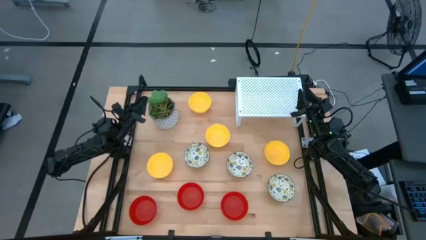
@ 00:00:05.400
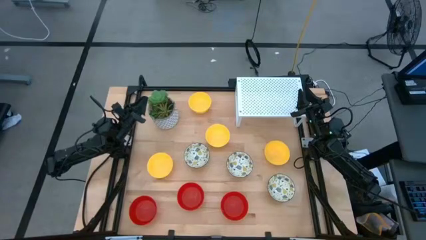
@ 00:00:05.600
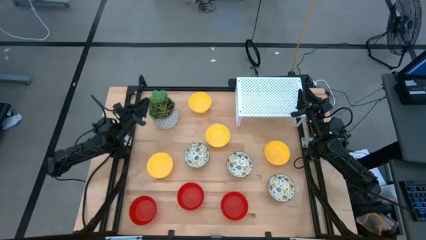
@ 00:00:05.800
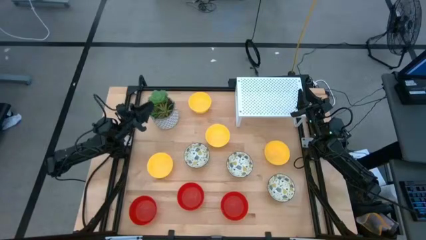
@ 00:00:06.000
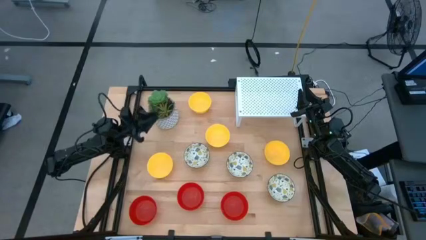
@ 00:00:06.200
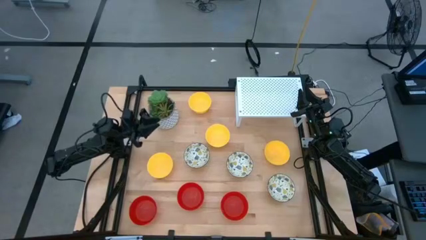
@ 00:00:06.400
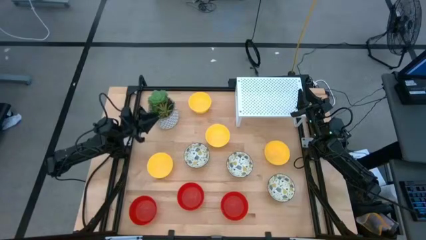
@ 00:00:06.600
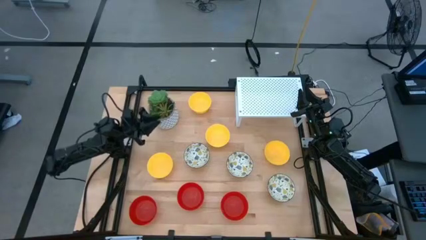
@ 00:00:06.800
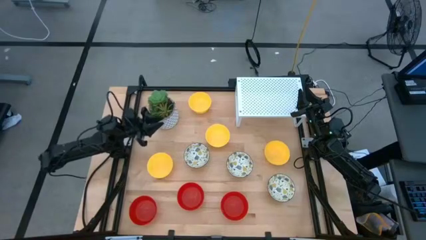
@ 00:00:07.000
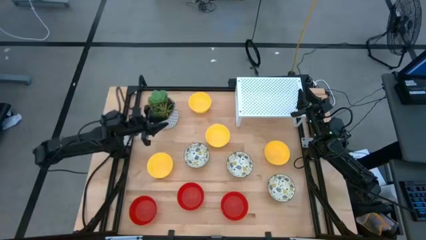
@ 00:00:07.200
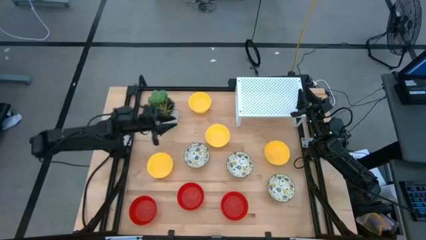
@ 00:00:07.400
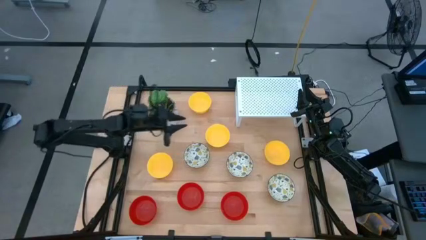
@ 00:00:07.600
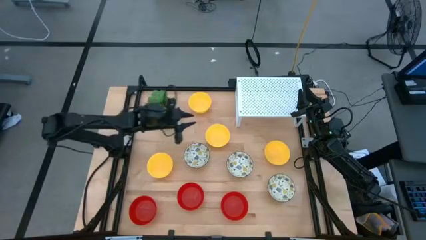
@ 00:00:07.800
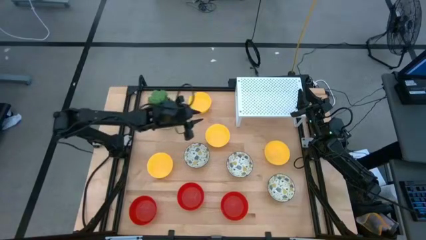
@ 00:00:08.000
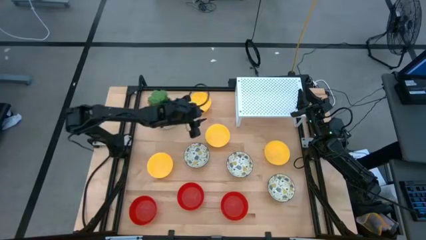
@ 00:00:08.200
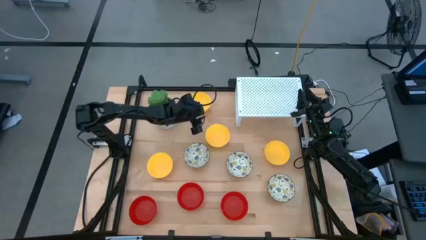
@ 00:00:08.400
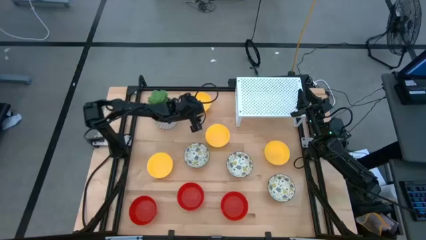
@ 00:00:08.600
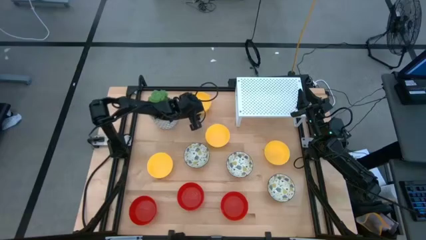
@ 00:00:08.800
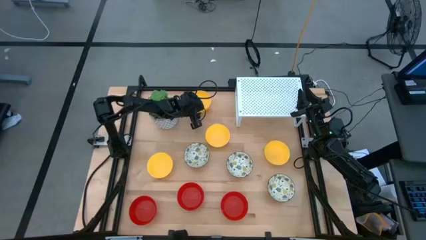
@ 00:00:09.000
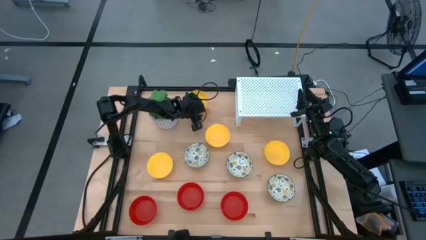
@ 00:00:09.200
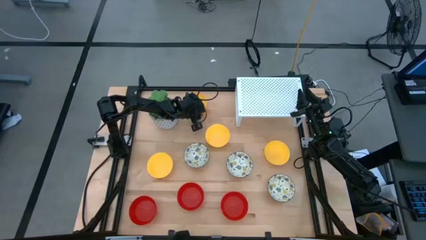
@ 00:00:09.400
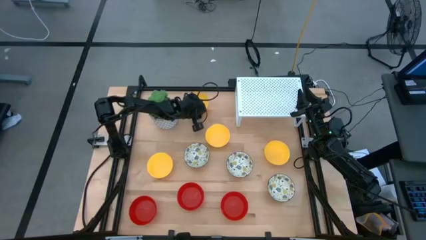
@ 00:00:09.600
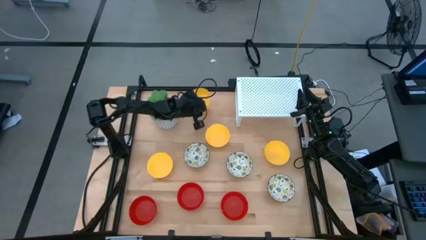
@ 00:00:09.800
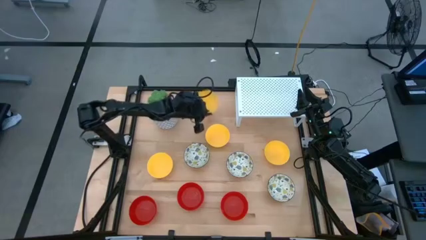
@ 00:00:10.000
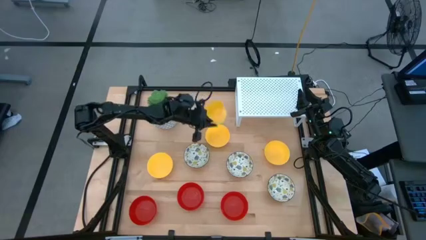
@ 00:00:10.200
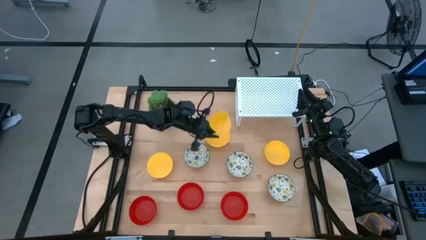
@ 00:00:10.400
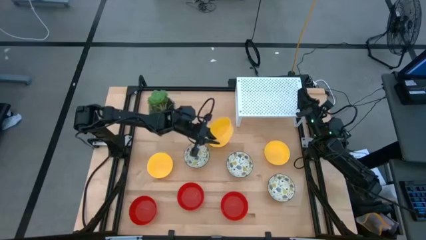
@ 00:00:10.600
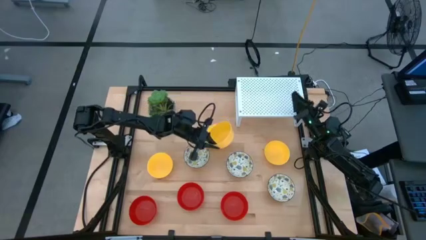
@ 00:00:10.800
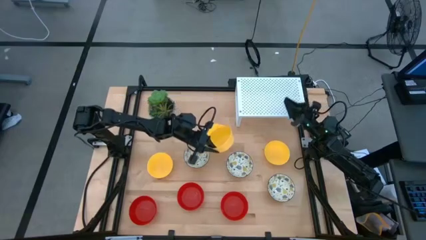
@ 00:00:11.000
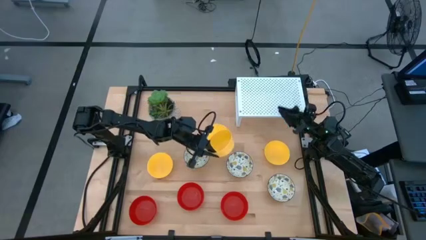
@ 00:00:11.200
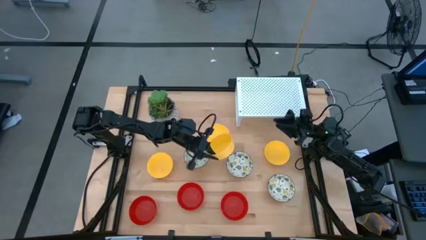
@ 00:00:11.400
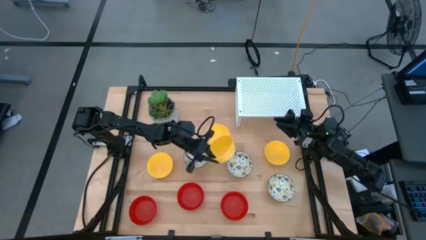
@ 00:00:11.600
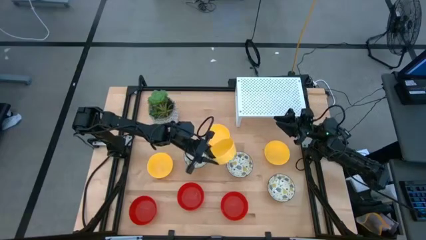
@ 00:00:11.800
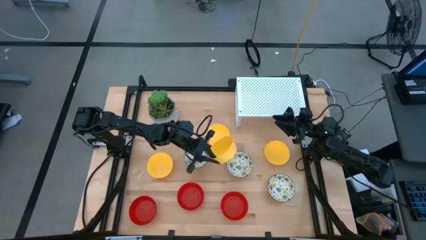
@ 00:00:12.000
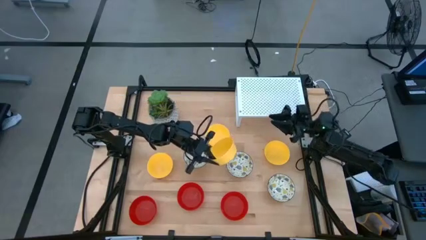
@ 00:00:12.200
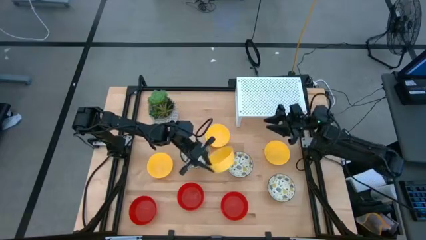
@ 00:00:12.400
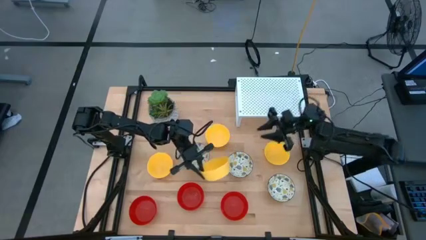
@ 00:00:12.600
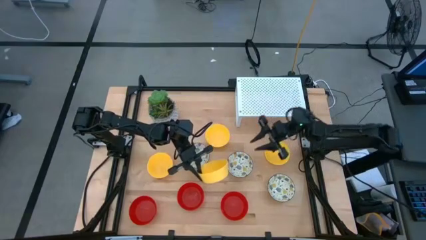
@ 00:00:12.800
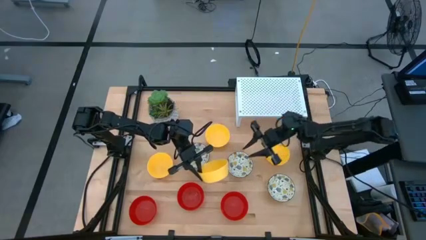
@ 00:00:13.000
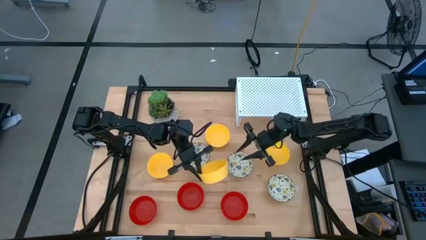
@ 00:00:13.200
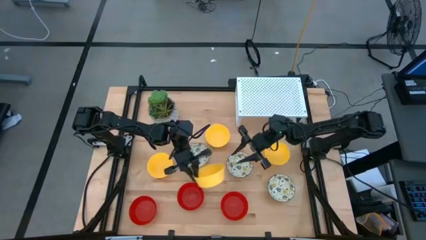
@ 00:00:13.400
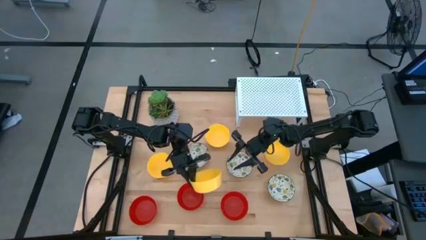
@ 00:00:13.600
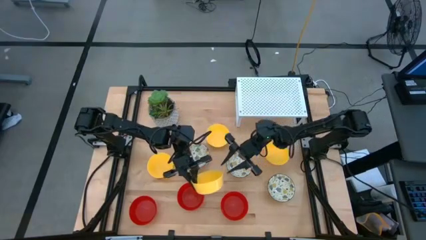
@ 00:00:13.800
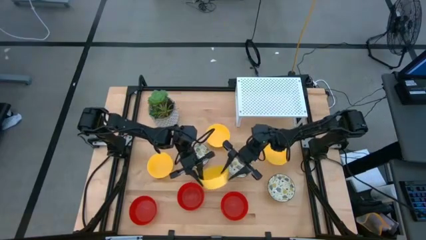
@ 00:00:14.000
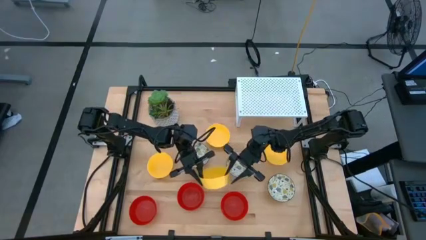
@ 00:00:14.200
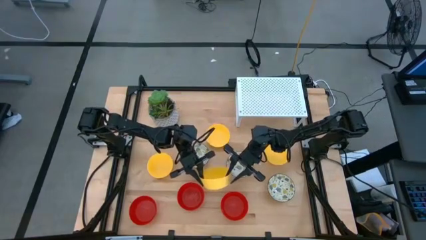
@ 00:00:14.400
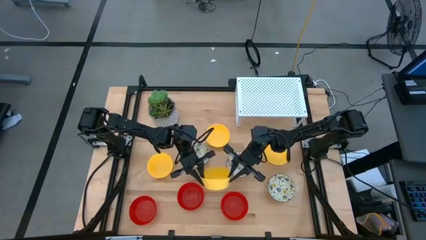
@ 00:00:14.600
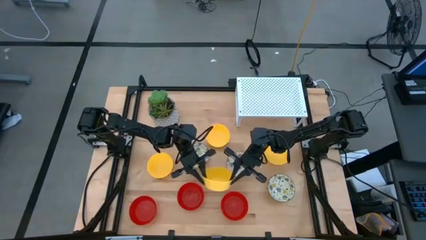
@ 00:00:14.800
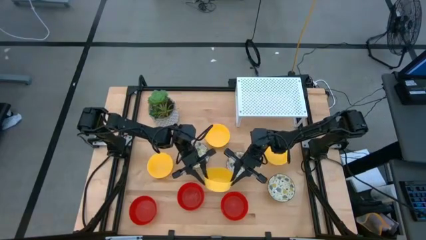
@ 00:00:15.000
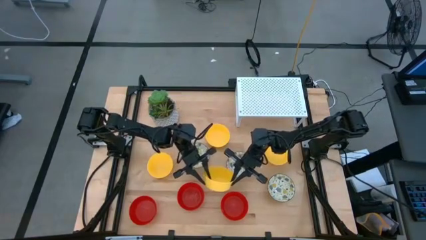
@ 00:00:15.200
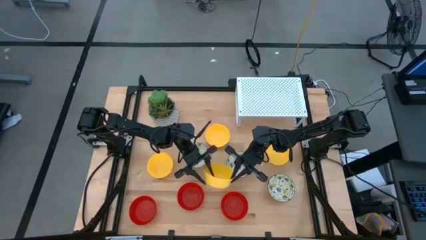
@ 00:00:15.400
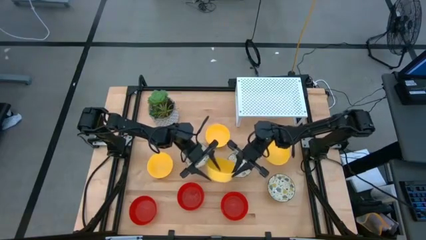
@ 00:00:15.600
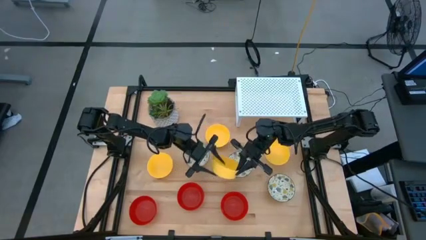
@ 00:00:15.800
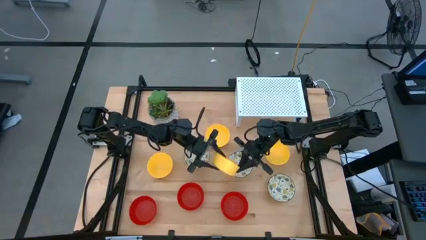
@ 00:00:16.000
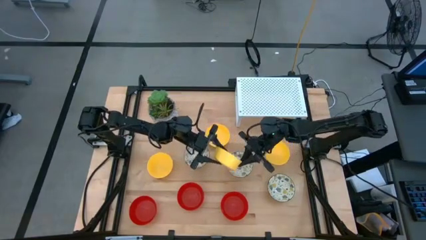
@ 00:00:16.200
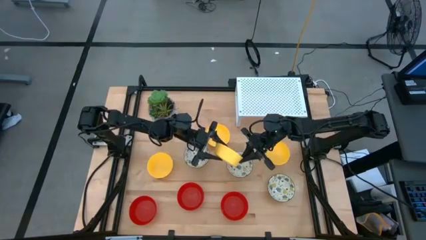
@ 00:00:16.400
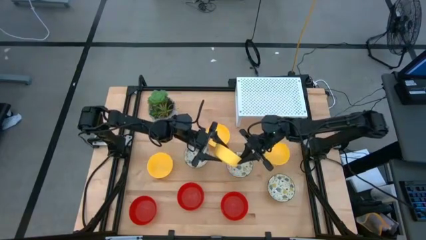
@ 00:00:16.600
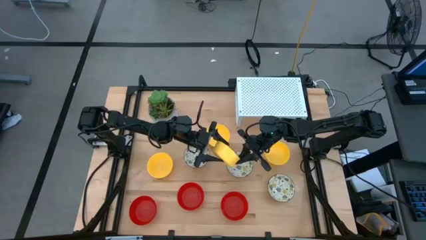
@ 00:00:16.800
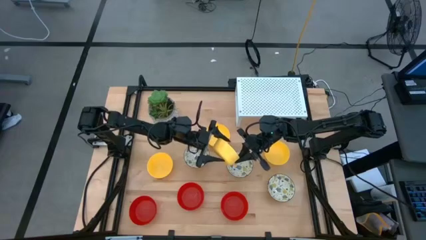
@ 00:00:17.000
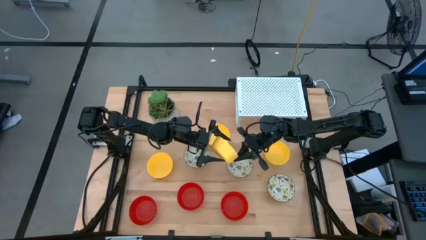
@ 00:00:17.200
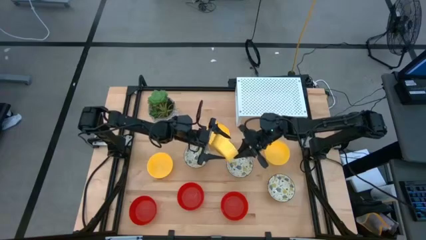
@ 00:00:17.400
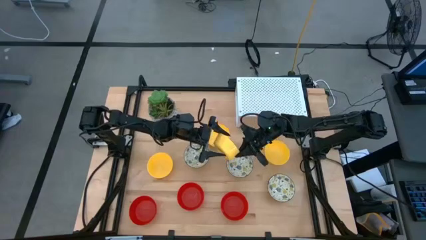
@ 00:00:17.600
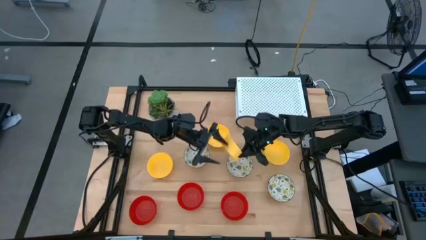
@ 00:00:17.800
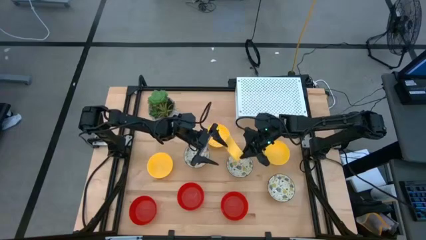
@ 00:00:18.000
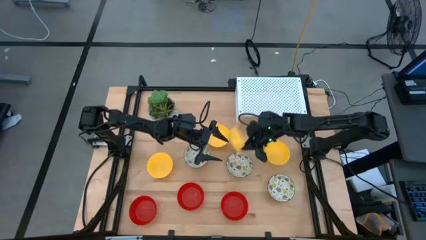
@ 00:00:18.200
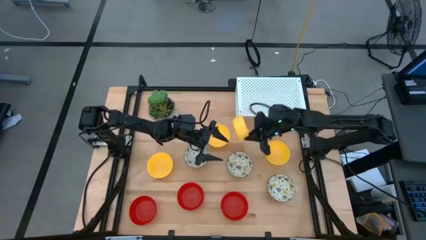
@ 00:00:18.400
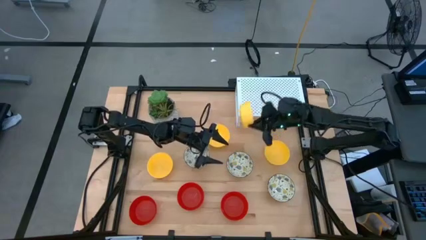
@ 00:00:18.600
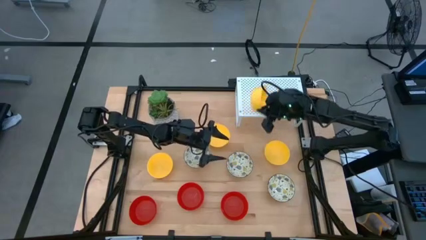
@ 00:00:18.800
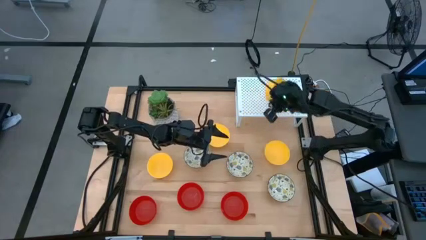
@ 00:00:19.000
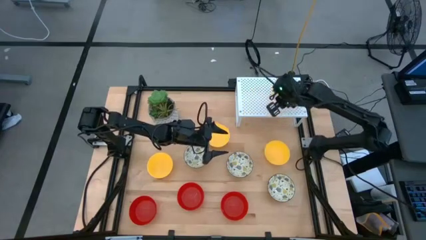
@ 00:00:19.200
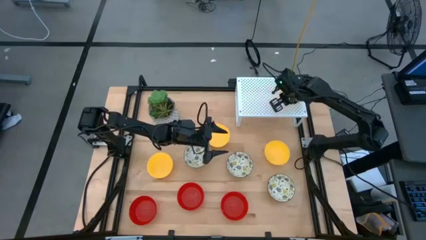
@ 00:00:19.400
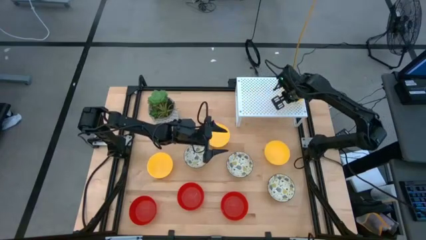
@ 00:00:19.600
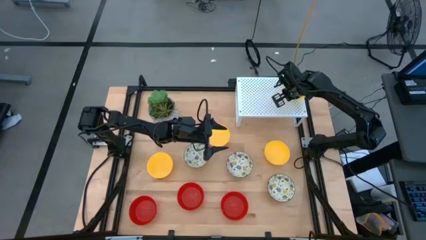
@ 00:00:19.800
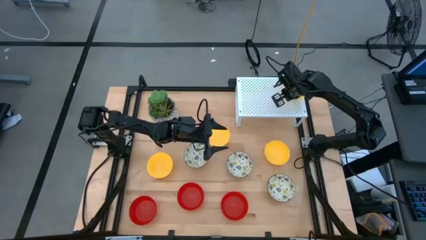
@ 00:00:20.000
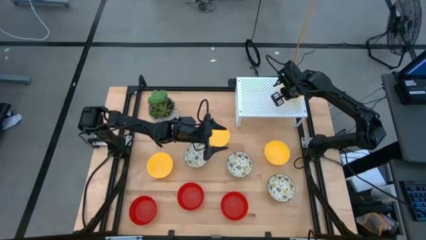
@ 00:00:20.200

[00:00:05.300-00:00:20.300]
Task: Pick & Place Mini bowls
Put the yellow bowl on the shelf
